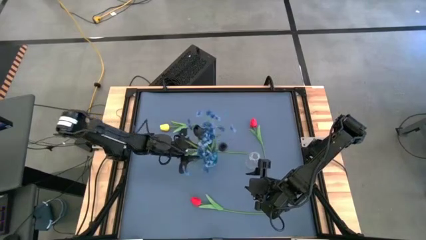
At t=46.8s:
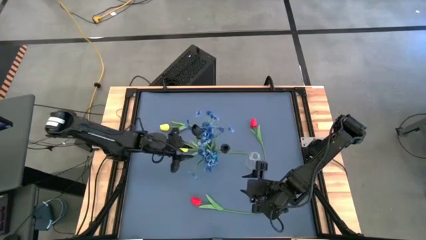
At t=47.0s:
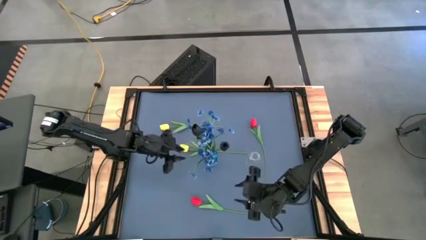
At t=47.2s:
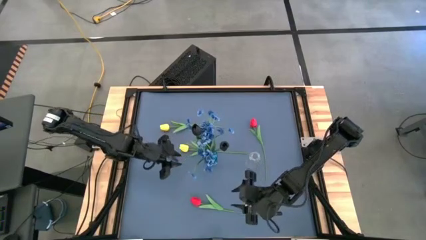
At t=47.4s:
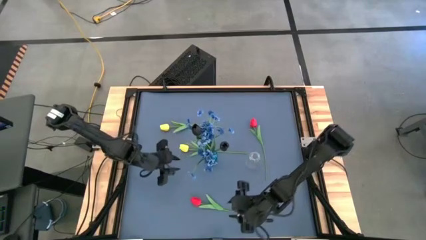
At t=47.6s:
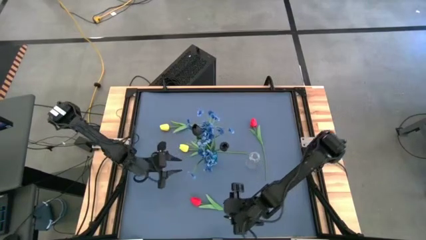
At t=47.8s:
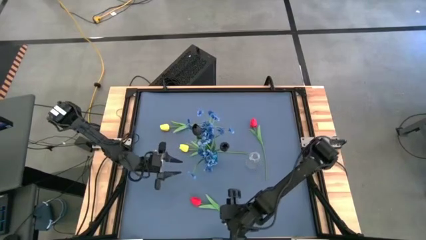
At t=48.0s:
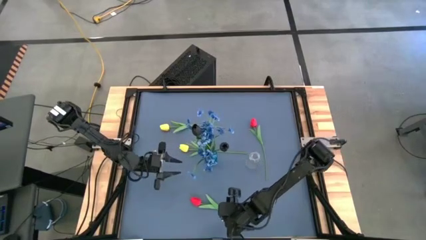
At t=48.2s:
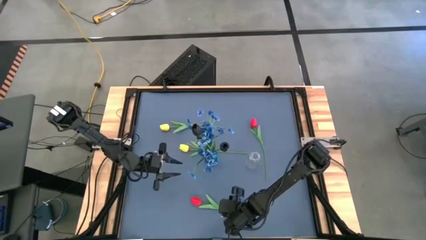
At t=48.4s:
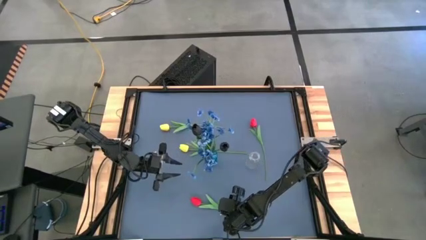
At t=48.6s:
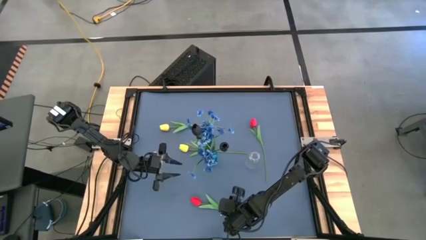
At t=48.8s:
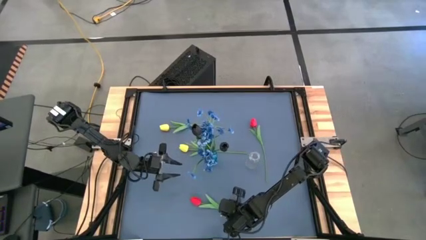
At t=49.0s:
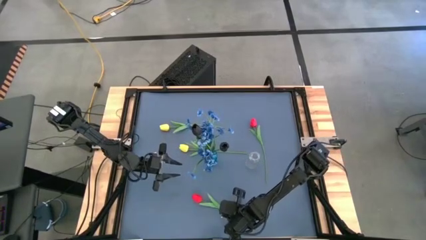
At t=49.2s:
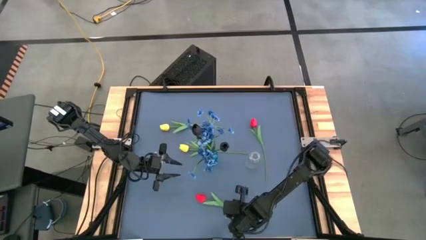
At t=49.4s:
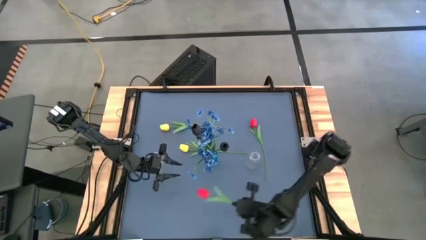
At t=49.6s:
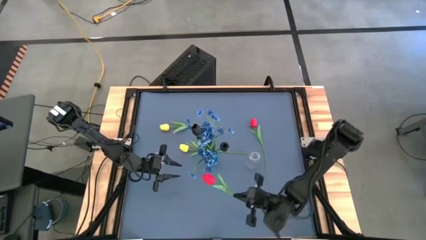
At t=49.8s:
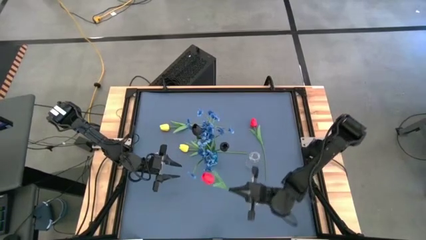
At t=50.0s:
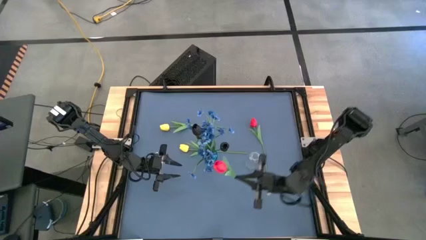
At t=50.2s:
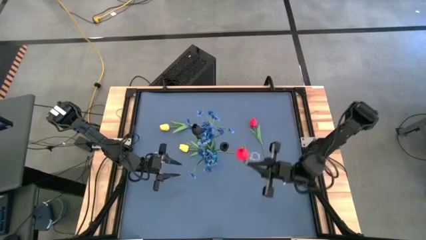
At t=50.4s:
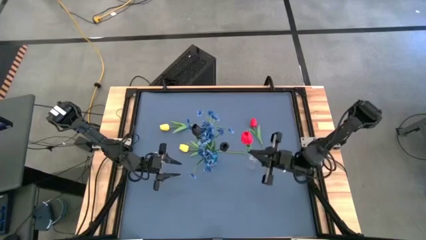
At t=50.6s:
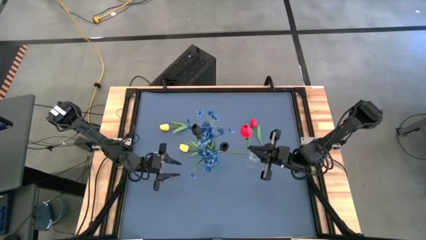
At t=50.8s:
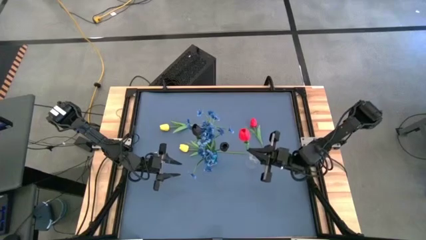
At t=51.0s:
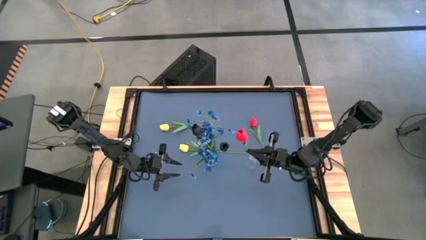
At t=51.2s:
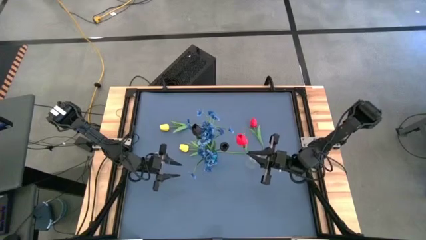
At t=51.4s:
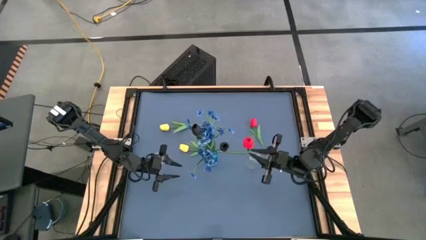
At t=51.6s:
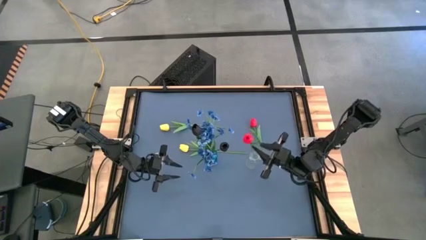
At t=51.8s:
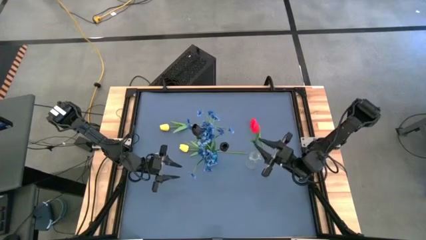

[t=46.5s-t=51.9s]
Task: Sort flowers into vase by color
Put the bottom red flower into the transparent vase

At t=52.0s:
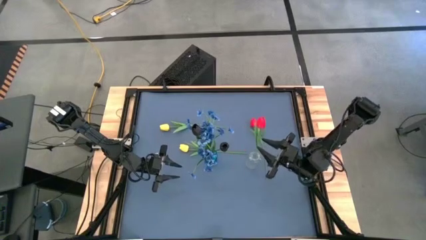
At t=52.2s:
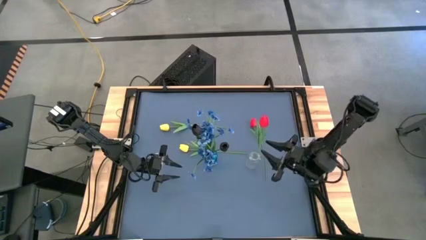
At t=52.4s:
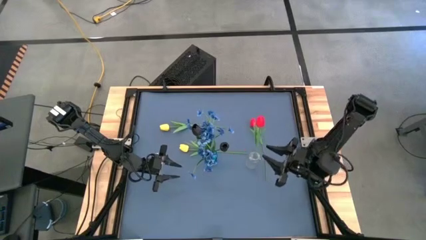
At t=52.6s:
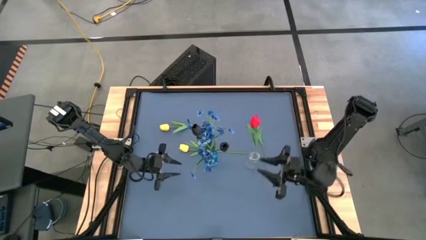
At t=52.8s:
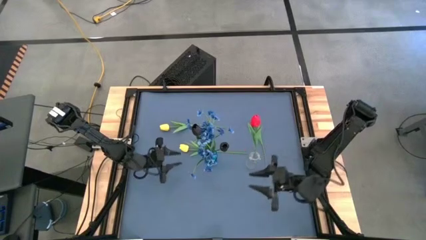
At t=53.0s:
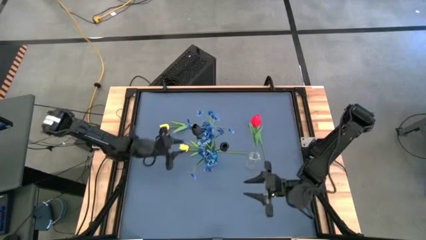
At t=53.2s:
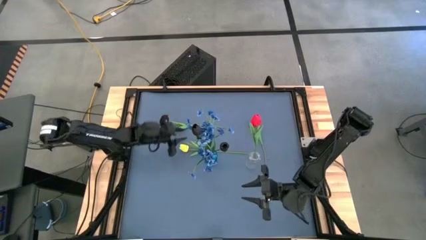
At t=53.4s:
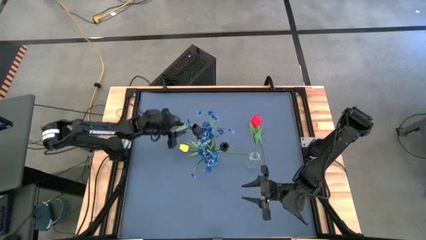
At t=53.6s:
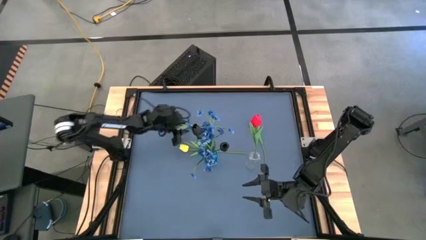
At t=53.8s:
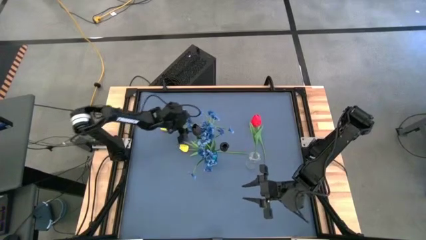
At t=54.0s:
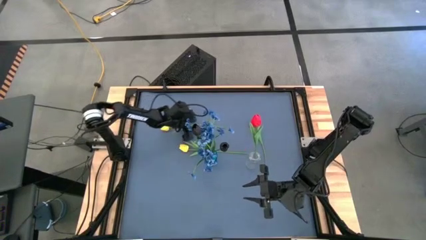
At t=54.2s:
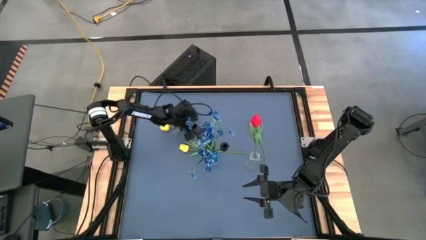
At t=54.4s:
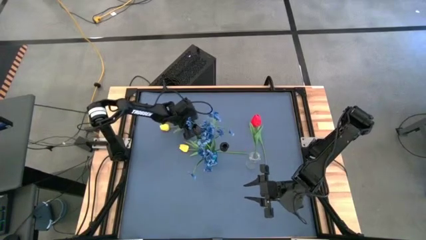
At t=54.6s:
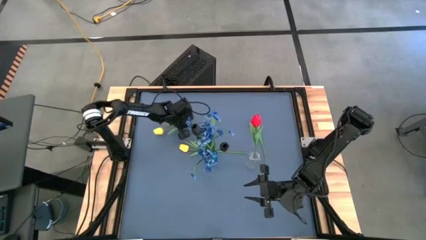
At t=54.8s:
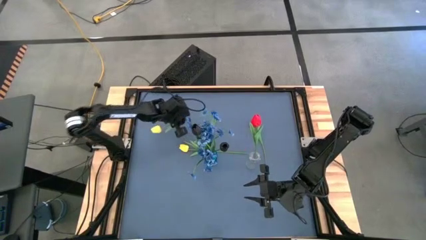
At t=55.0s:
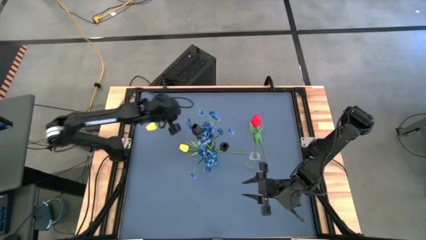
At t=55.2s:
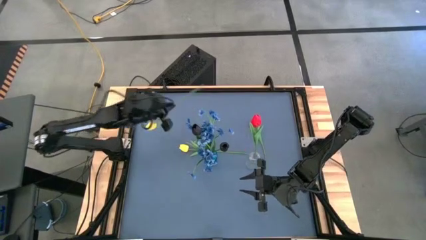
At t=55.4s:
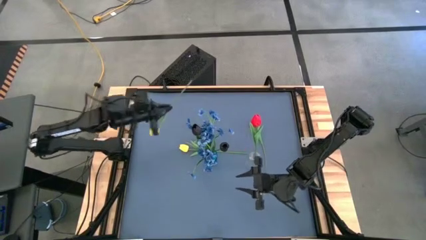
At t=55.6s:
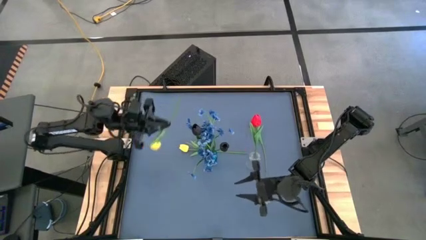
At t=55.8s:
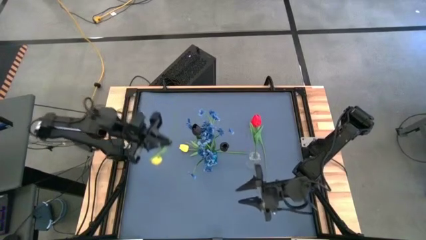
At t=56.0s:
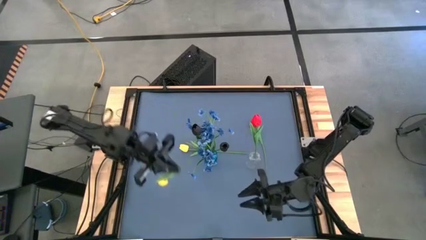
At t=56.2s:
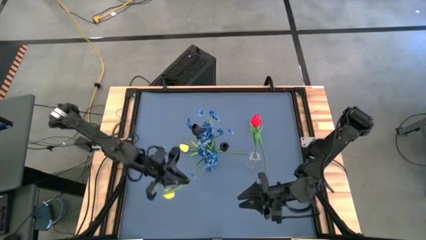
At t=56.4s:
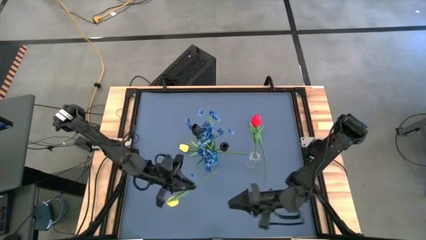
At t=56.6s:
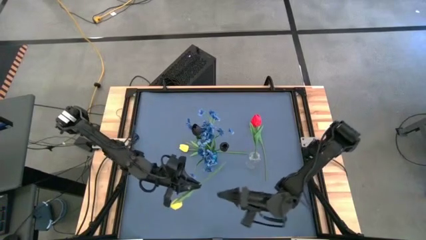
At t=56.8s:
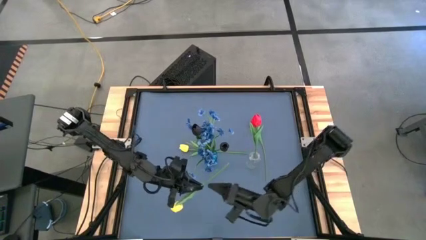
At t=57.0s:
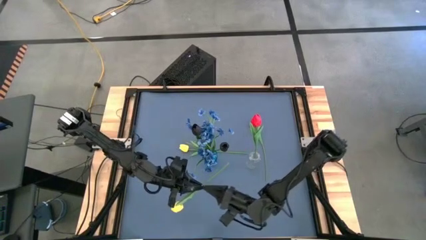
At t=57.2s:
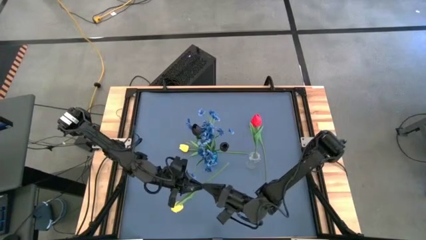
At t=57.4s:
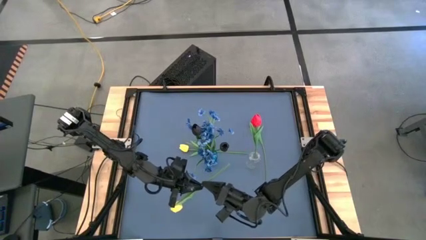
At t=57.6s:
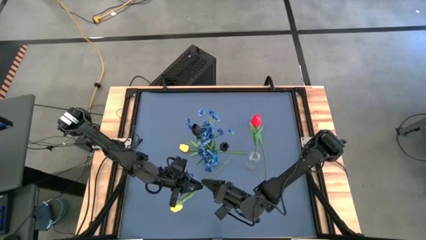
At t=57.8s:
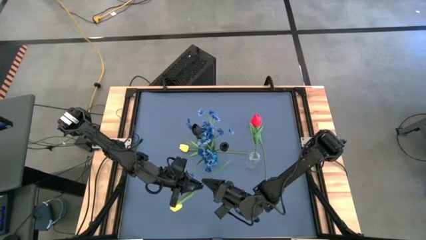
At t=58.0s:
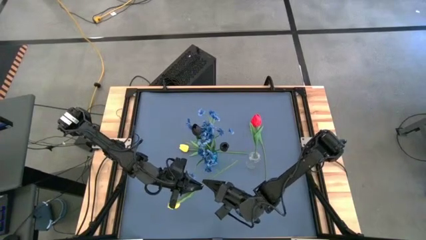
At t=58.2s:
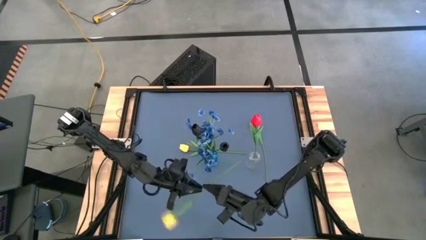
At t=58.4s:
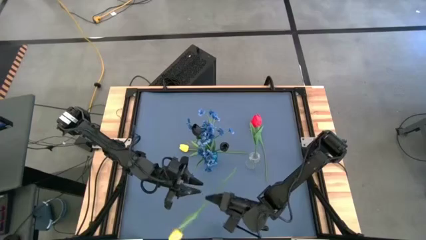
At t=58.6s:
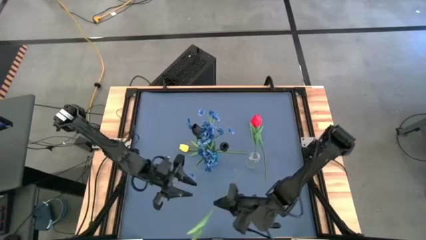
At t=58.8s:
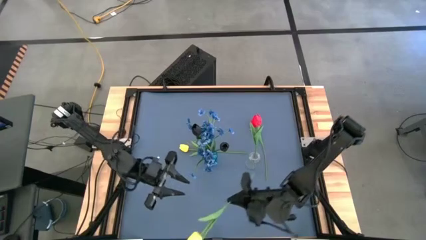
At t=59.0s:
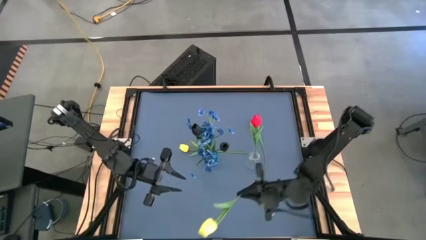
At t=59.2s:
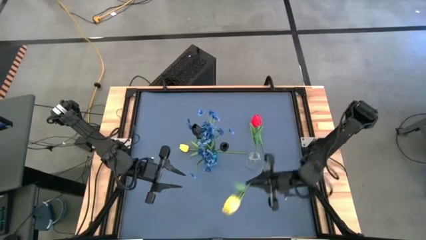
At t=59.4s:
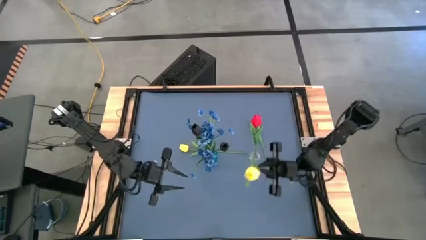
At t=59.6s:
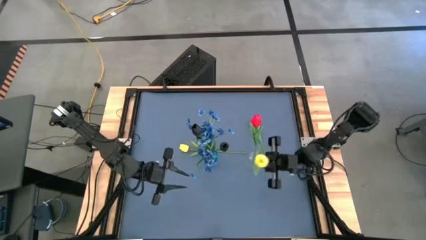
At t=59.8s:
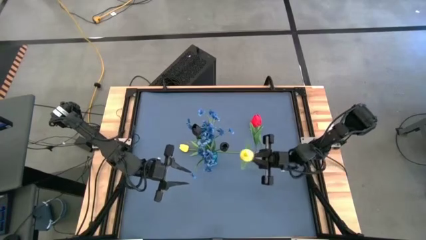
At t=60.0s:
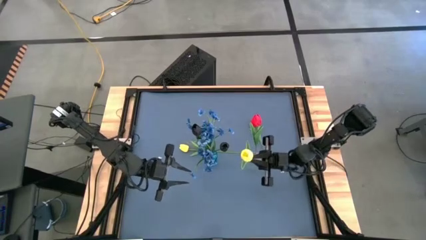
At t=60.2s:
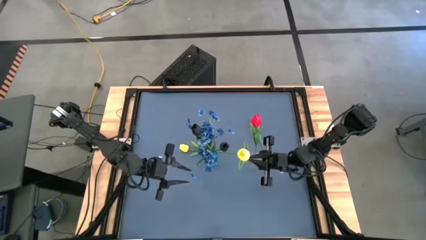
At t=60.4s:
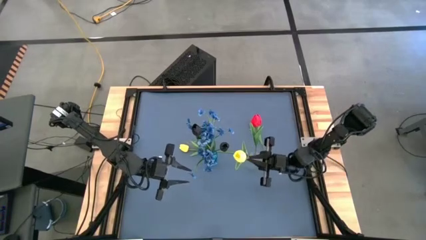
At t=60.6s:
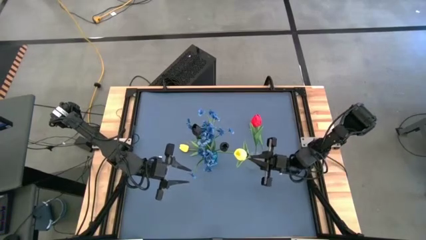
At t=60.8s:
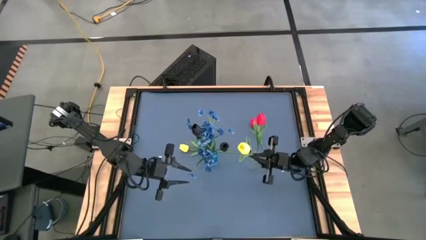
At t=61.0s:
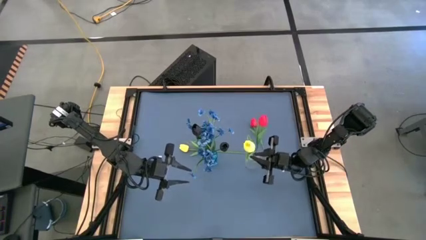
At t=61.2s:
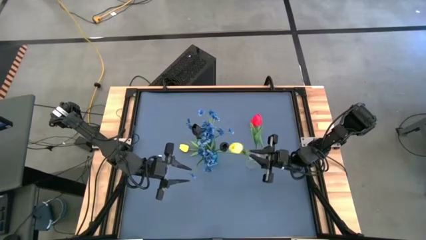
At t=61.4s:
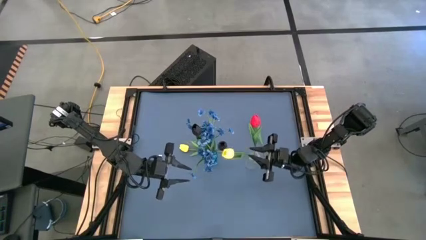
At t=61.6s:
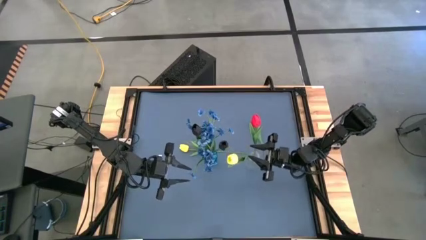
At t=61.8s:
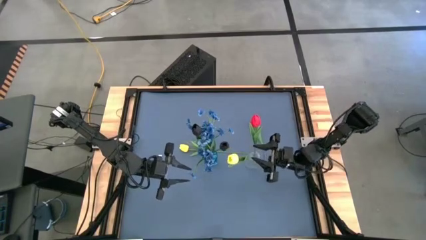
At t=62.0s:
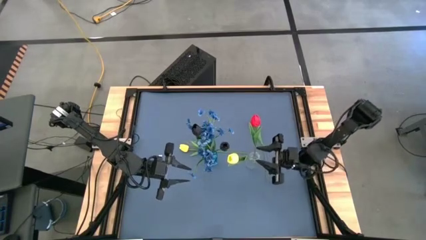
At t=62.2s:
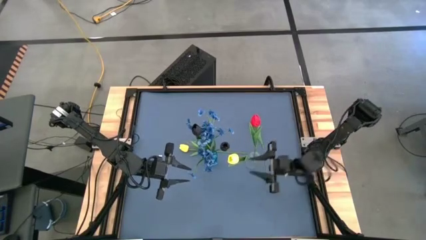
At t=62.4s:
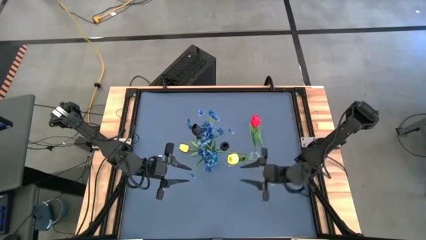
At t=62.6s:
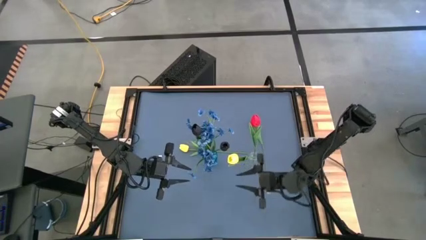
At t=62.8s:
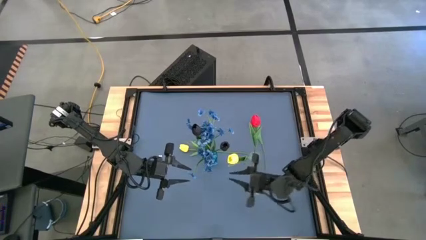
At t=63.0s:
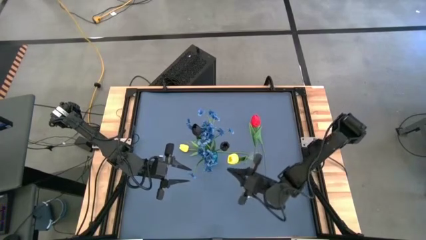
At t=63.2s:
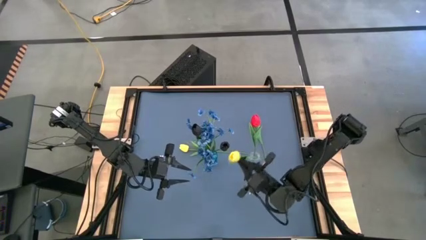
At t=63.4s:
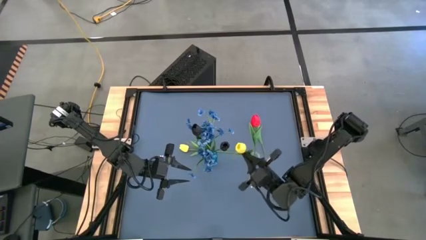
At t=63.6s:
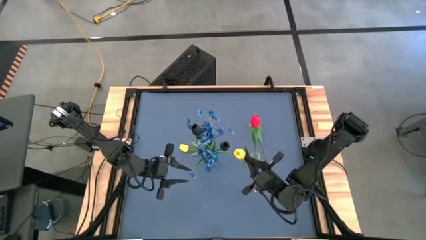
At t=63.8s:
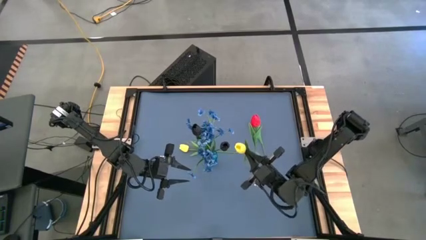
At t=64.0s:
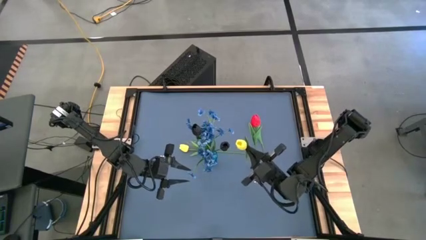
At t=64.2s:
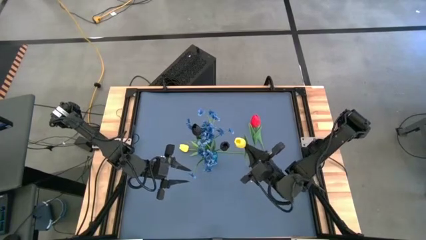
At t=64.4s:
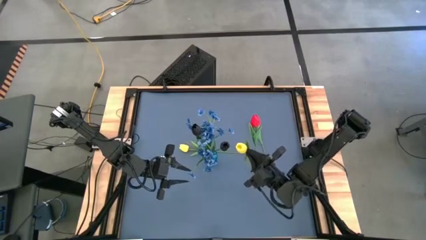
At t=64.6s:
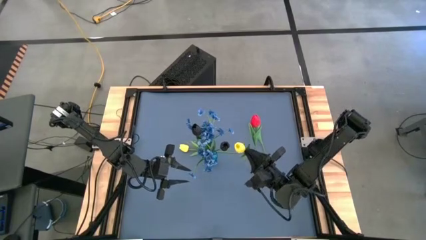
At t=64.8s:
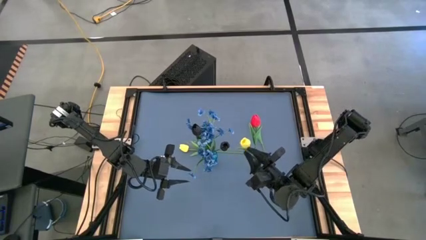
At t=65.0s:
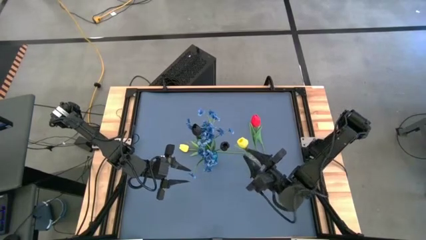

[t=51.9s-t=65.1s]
Put the top yellow flower into the transparent vase
